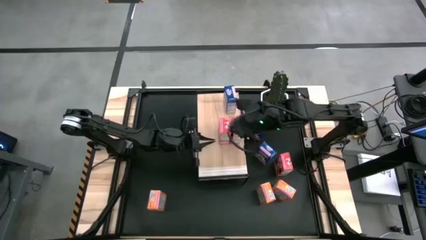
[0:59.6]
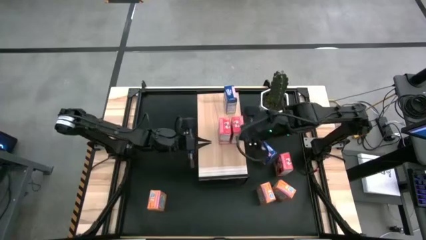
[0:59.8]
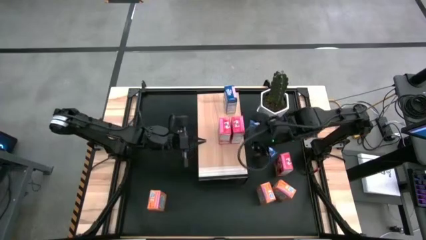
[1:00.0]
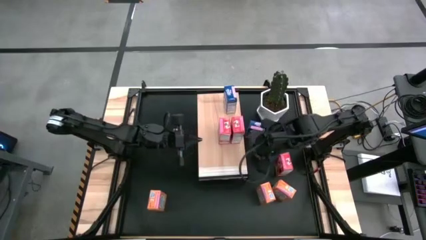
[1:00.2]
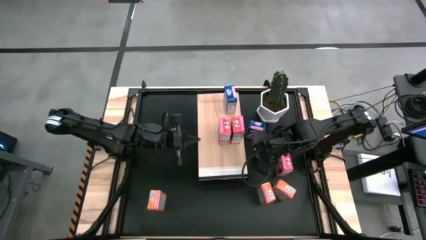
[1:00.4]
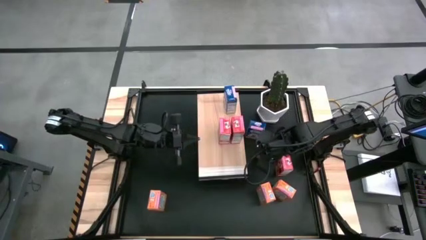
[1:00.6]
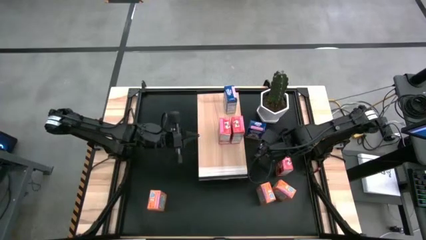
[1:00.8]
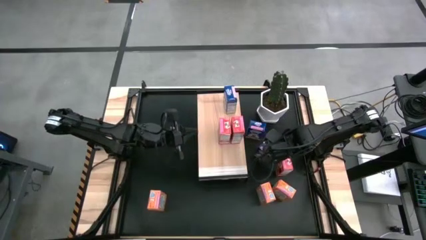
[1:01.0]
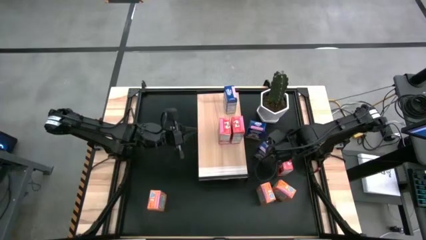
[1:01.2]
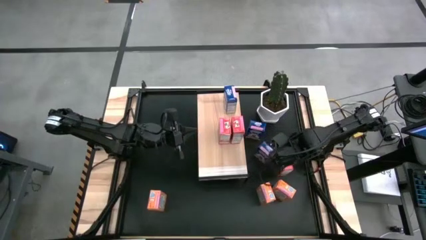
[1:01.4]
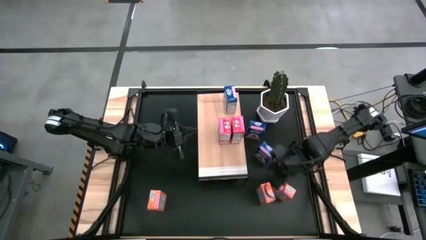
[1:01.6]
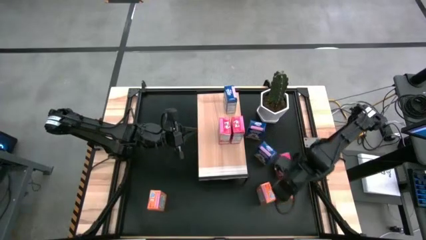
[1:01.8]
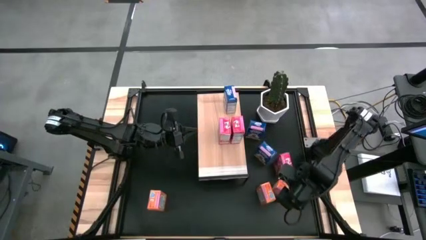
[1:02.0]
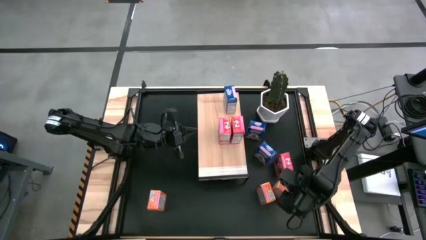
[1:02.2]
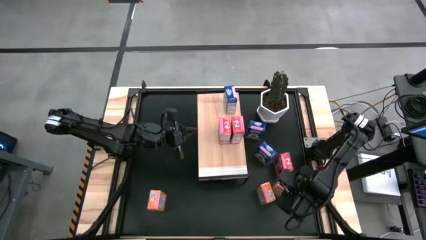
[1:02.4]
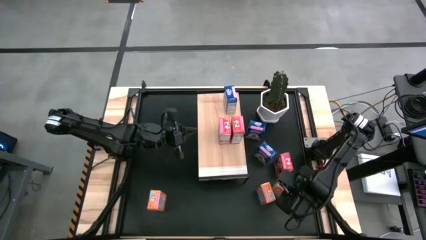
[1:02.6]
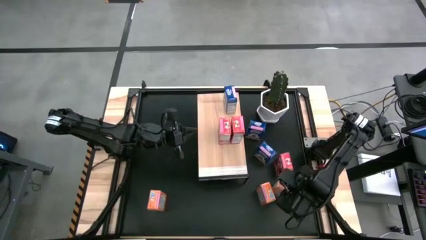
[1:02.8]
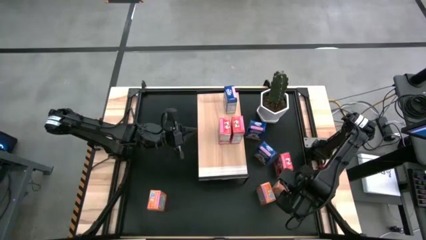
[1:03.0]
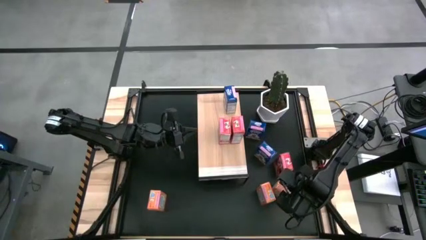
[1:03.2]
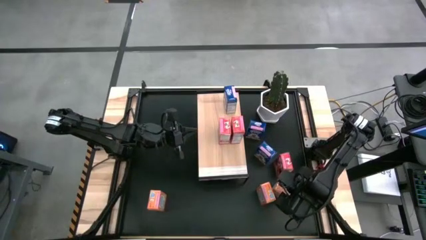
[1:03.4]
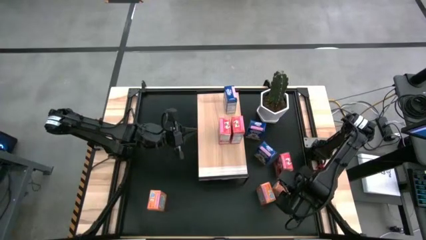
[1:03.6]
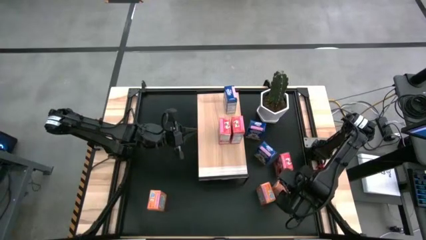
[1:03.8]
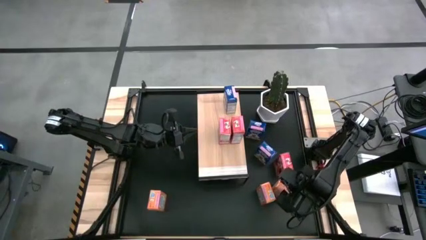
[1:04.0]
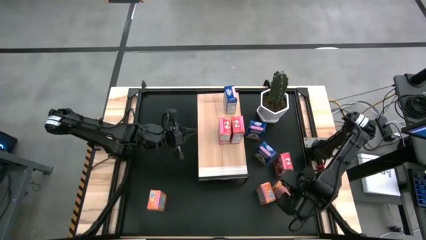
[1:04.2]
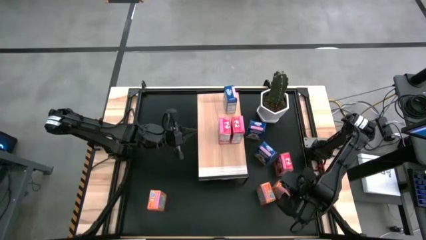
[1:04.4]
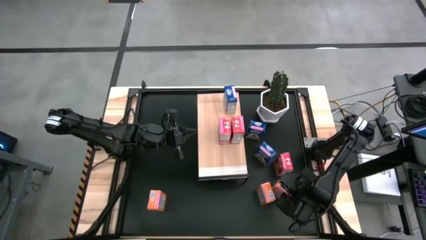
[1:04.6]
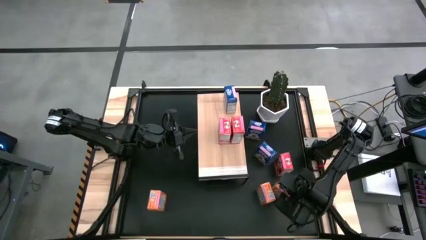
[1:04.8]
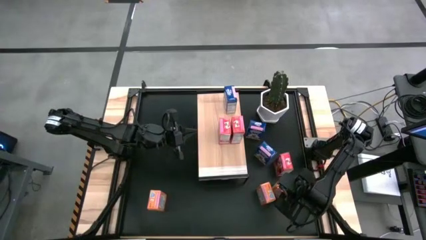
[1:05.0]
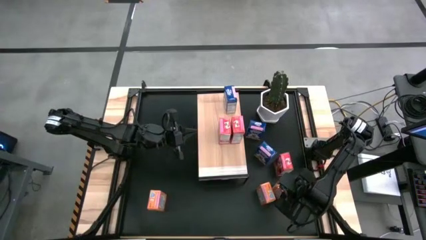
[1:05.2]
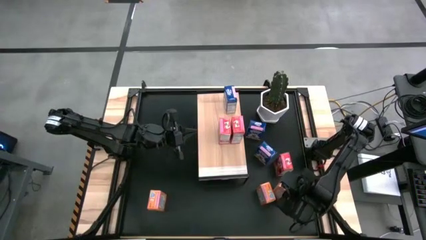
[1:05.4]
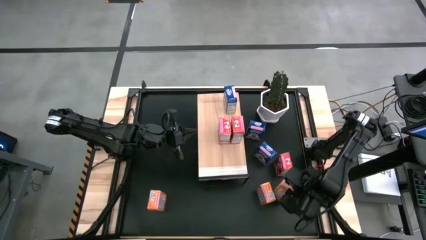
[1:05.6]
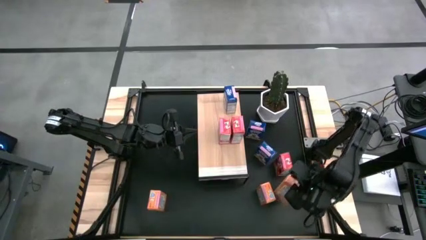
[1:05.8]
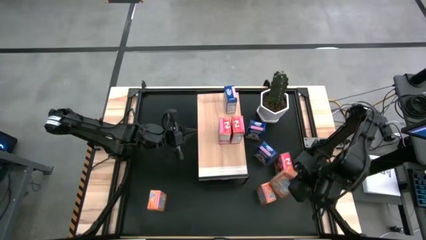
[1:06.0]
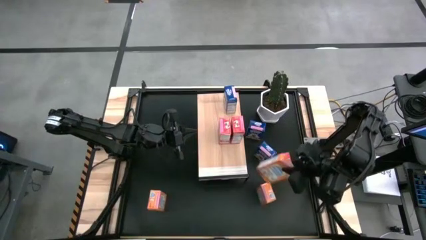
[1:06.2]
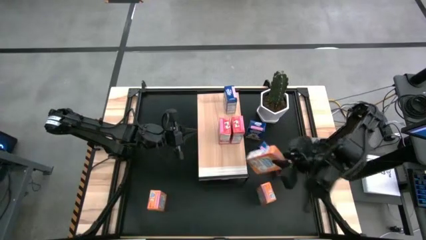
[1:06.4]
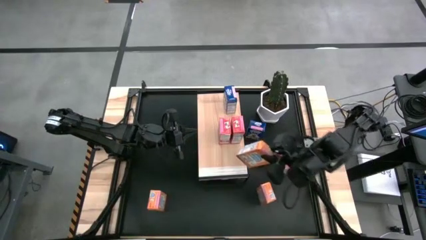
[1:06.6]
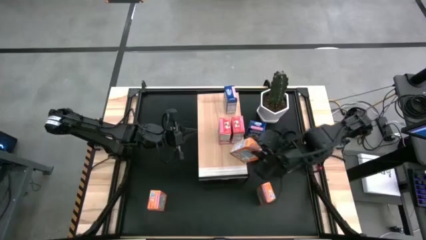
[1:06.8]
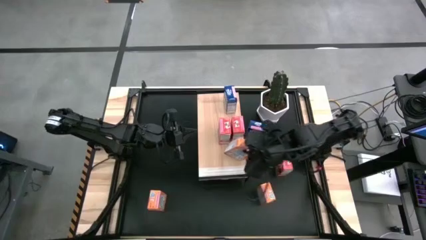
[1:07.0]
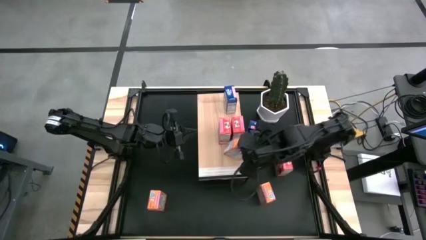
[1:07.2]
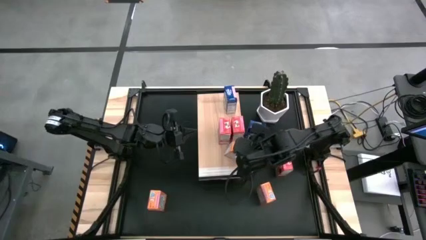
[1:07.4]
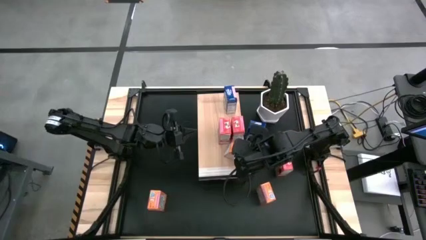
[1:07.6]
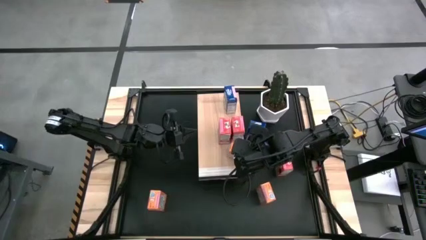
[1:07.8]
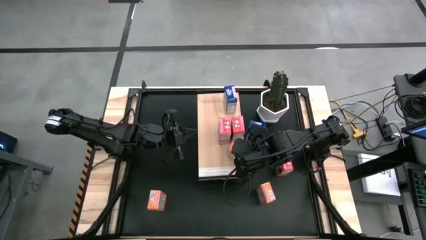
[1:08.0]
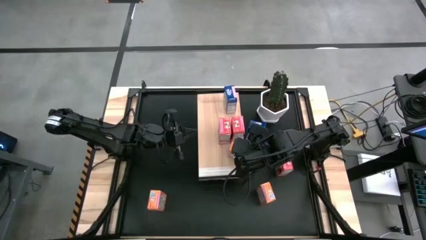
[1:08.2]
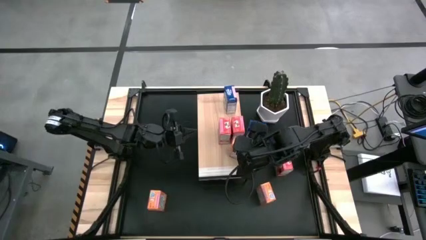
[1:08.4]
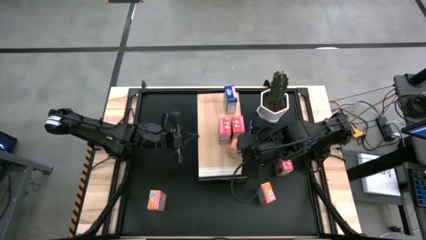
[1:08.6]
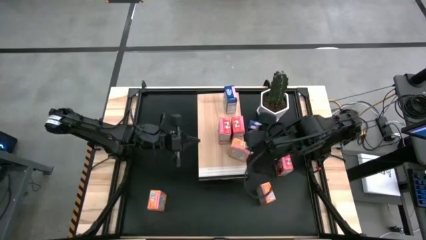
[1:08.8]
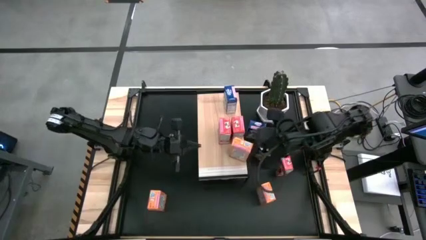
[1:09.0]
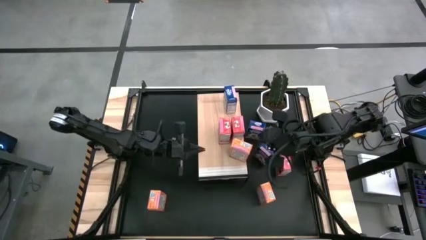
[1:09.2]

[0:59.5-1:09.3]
Task: Stack cereal on shelf
Put the right orange cereal box on the shelf

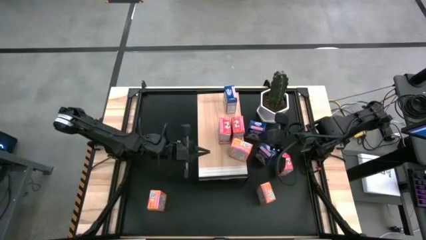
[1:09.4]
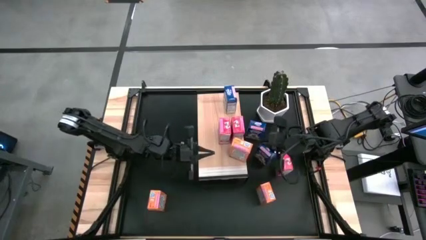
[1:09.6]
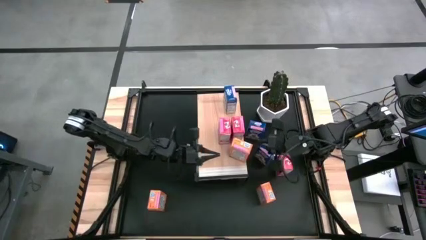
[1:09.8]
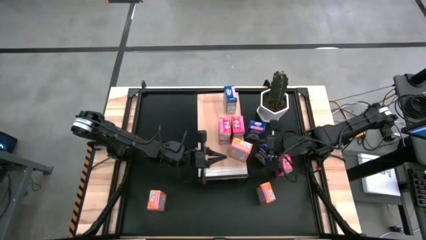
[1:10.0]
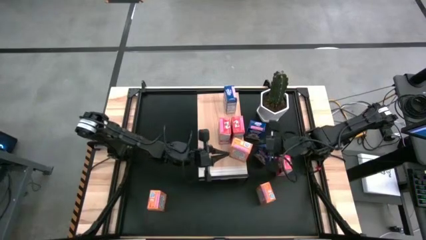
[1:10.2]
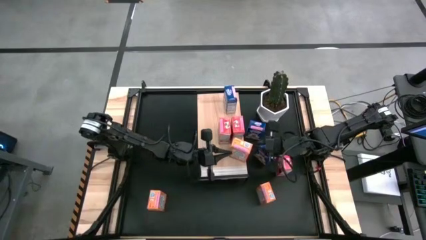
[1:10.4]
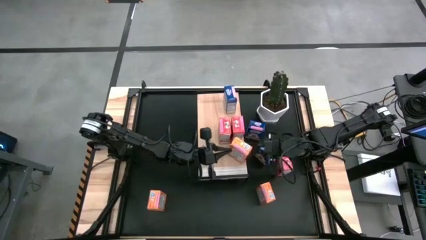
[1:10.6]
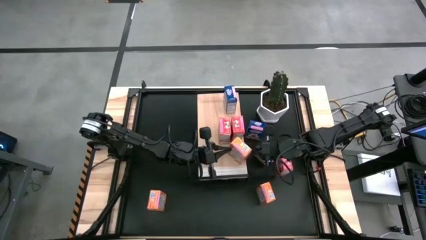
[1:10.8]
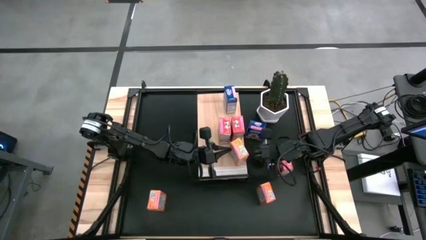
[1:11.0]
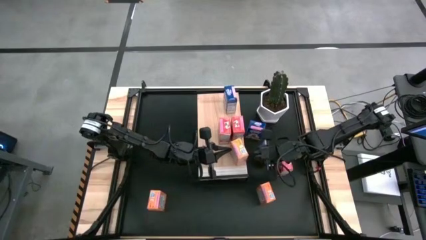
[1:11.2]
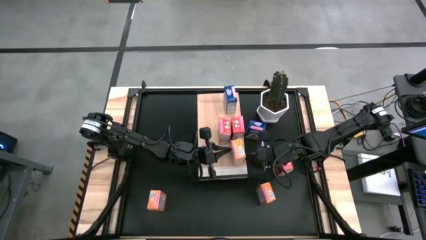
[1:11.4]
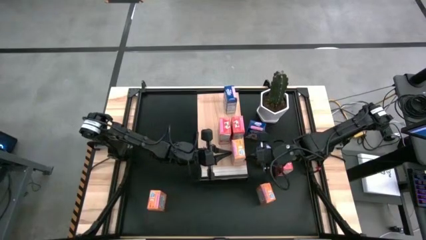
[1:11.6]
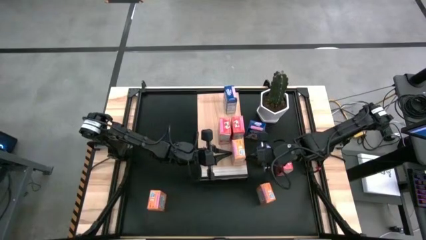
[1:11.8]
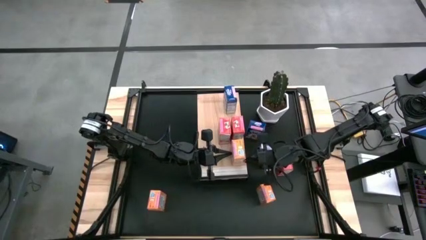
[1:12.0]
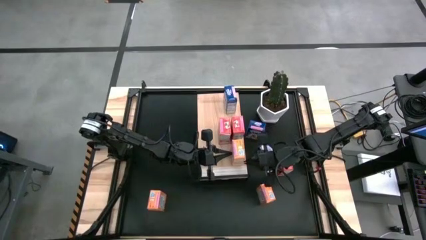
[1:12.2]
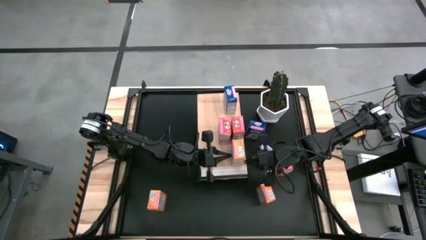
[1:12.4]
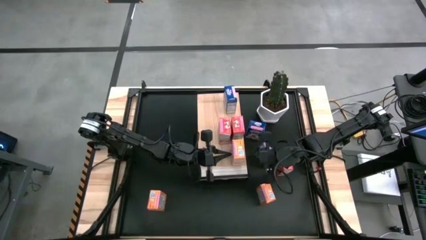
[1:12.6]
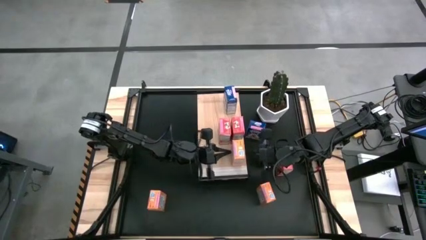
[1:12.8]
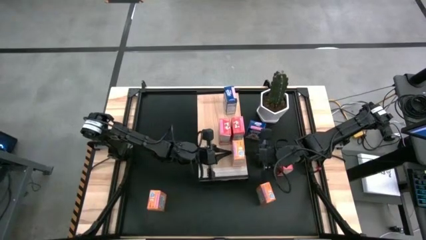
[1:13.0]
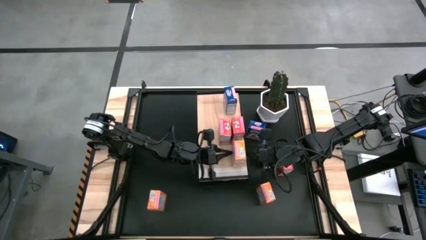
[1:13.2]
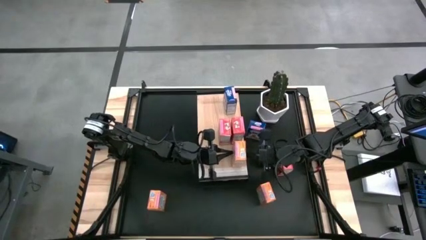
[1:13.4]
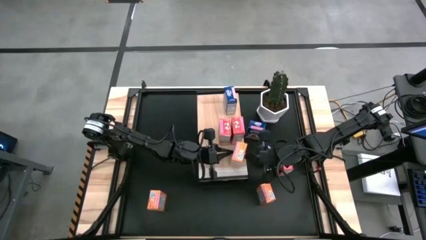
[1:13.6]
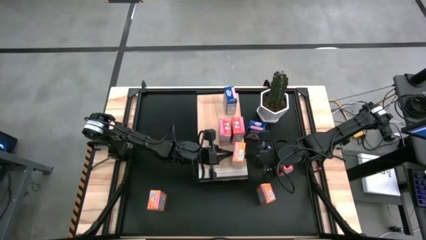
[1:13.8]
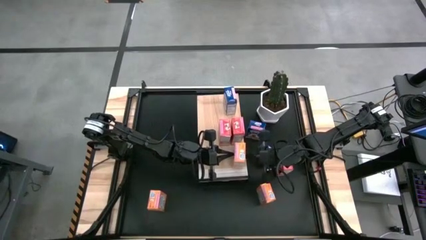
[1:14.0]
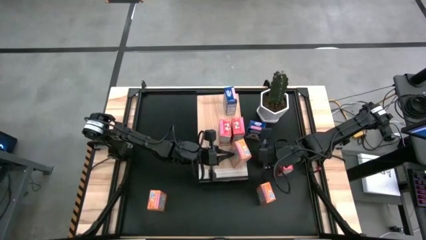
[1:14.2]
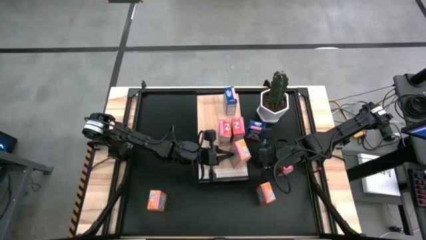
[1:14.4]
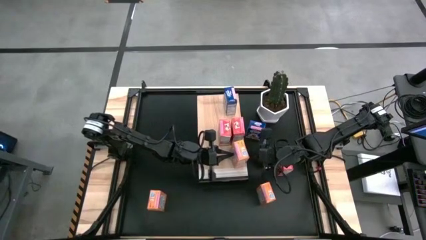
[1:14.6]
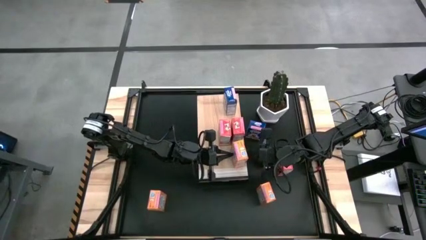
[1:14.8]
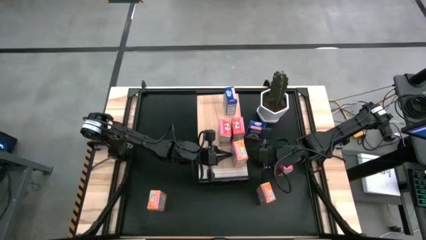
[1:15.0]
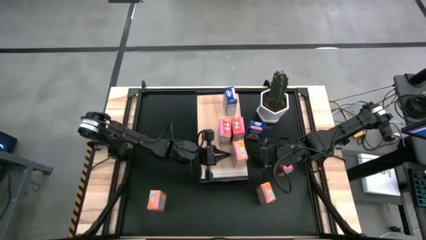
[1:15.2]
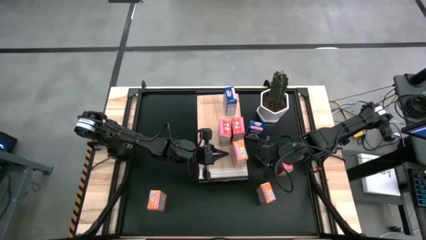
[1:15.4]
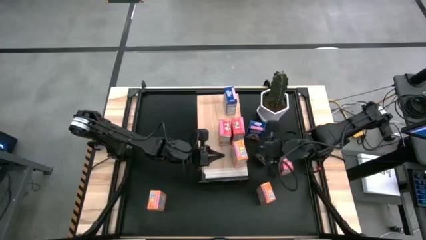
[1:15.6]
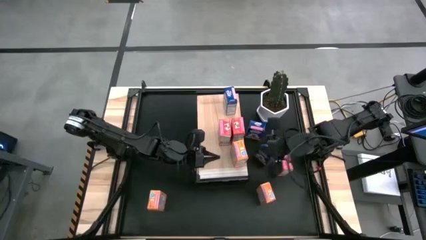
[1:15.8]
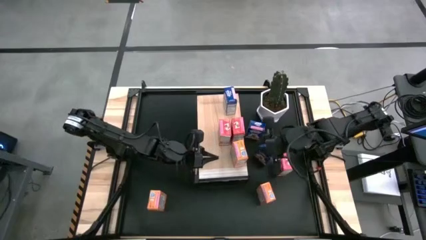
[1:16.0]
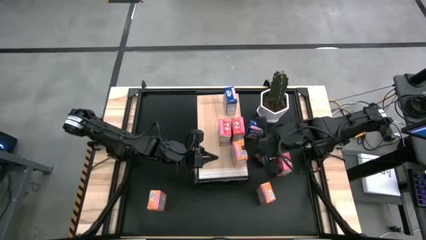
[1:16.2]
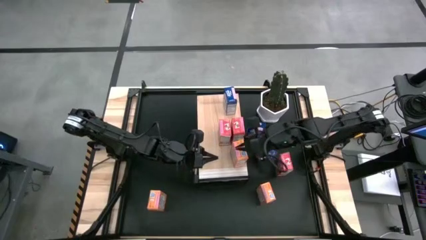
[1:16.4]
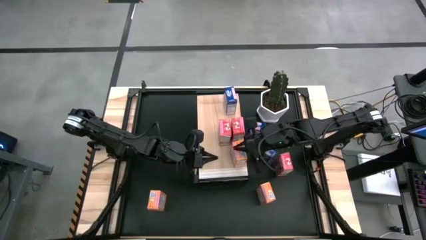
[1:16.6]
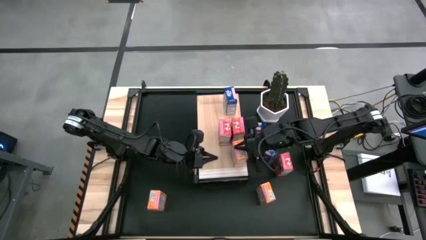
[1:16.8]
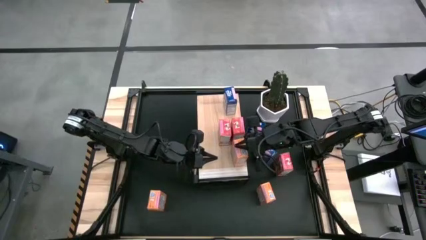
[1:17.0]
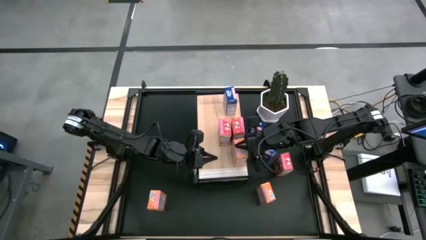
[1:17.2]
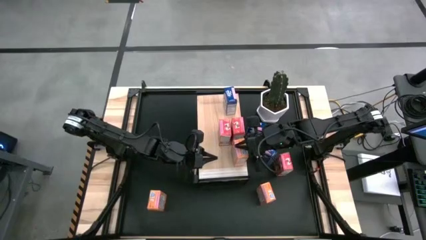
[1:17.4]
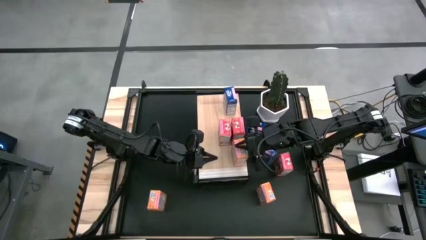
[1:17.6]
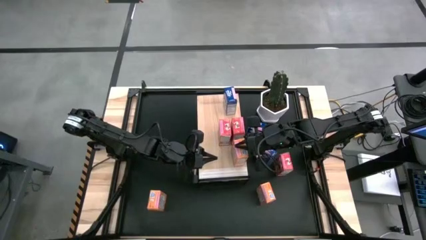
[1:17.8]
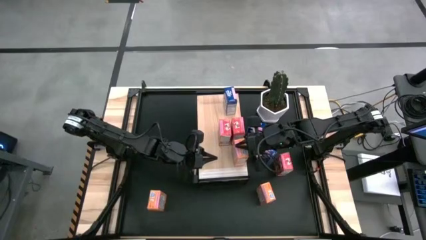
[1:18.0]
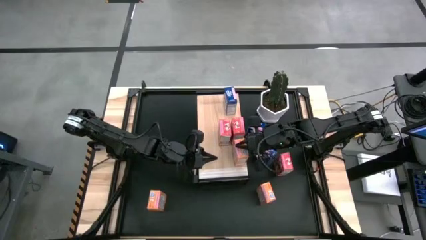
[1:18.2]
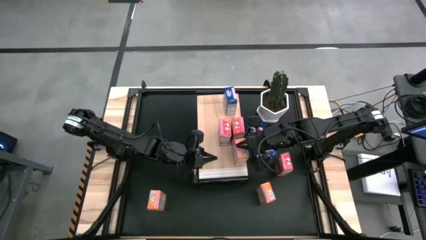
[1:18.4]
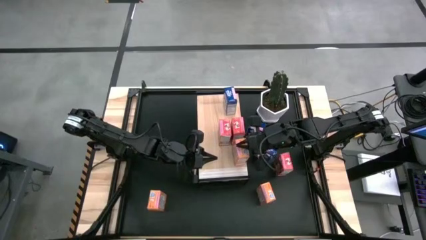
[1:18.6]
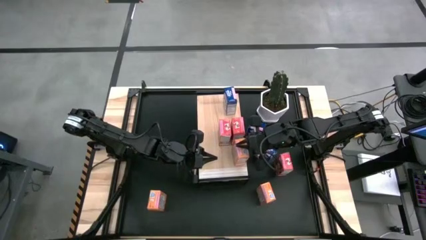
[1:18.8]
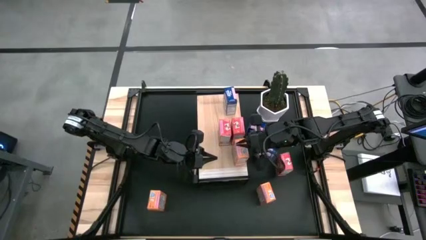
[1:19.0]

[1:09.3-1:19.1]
Put the right orange cereal box on the shelf
